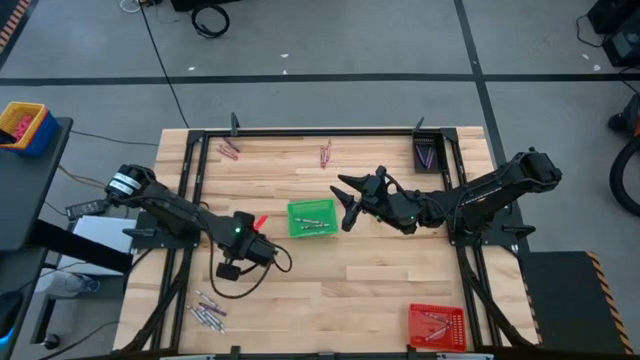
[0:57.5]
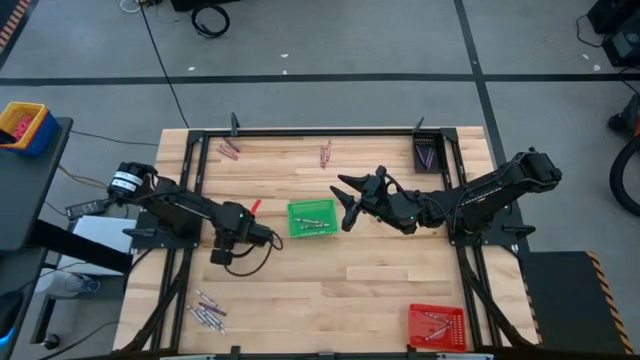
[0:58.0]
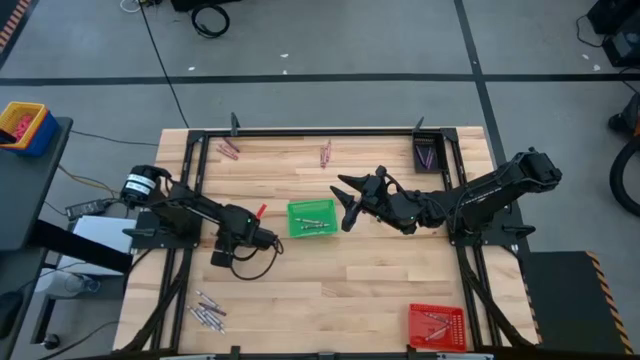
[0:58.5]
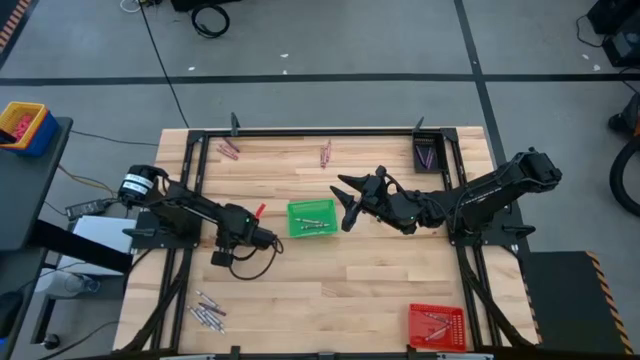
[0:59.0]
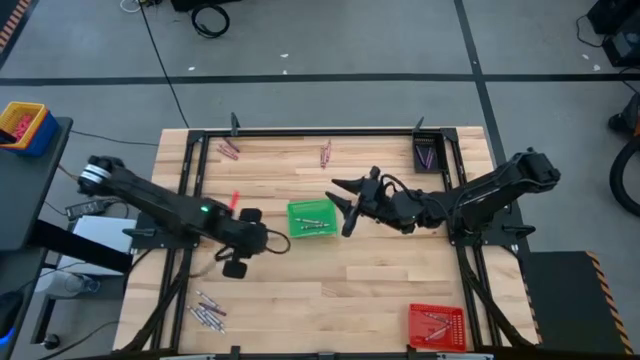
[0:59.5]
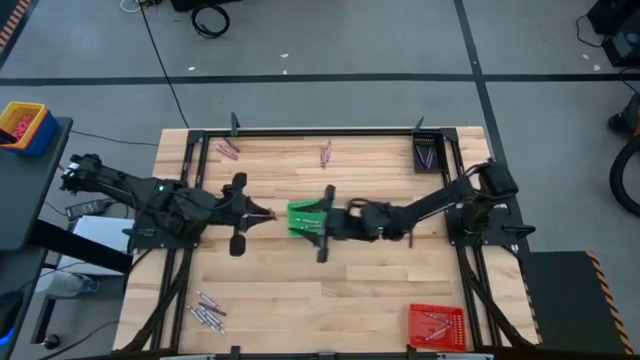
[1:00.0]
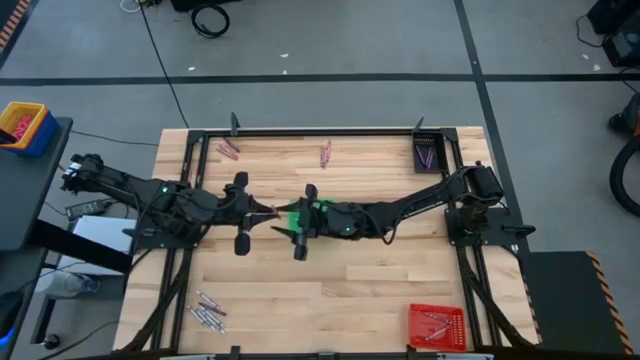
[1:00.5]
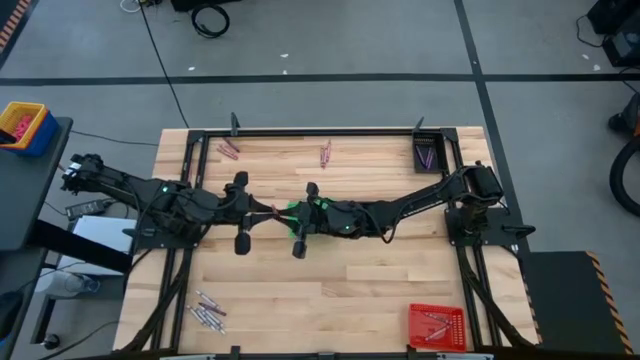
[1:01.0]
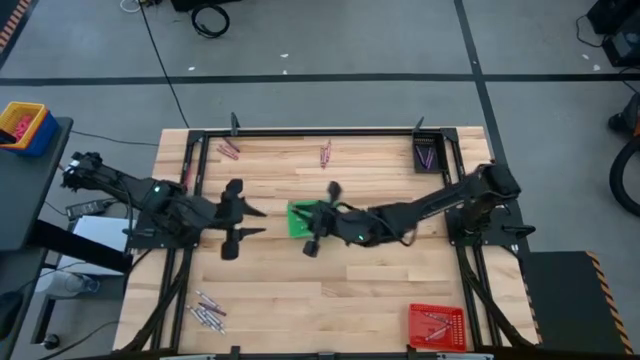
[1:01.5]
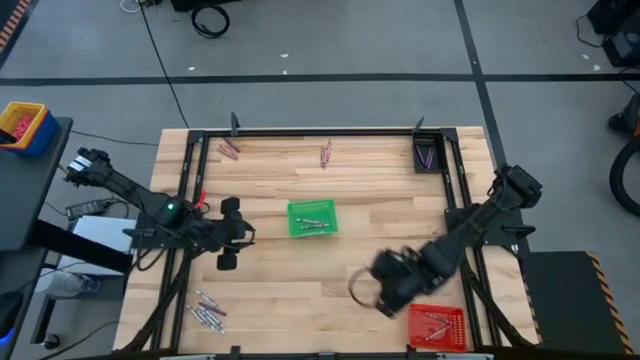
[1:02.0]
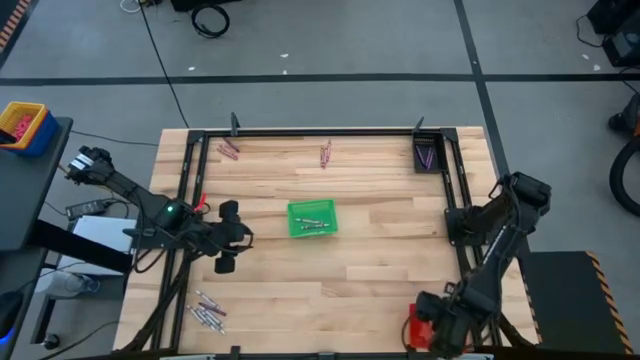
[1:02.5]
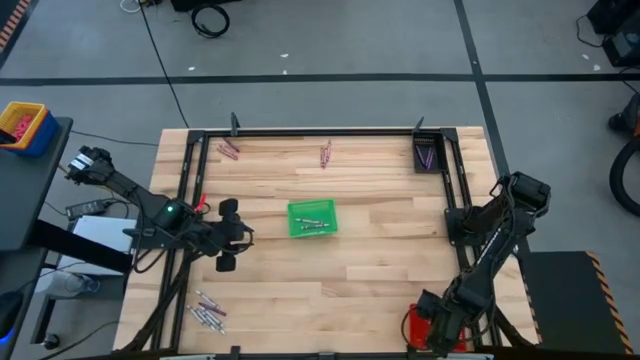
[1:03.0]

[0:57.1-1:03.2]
Task: Sort crayons
Put the pink crayon into the red basket

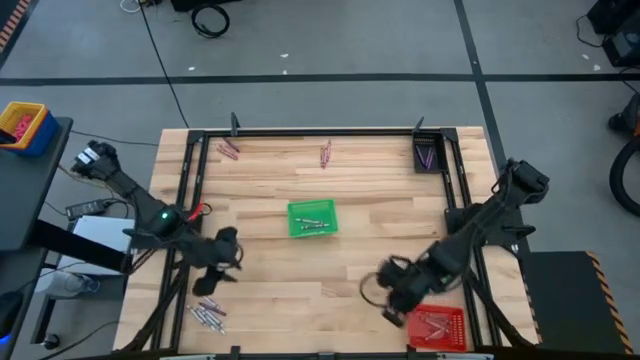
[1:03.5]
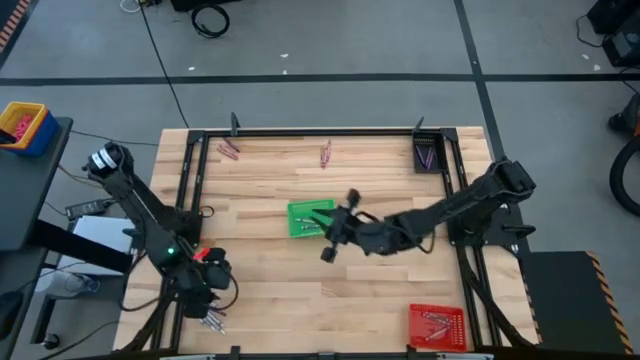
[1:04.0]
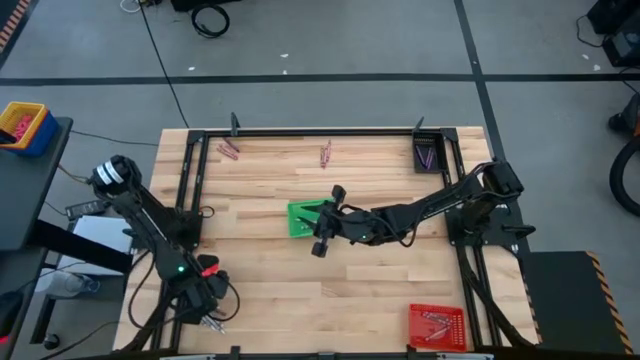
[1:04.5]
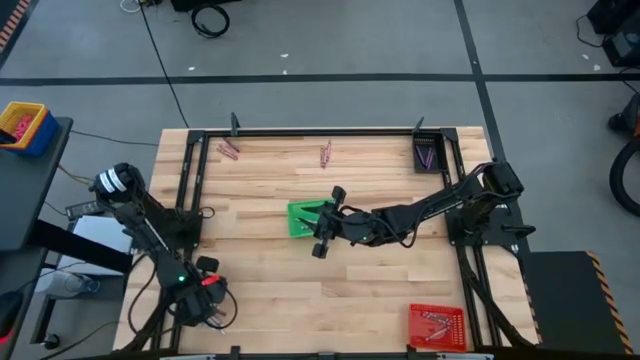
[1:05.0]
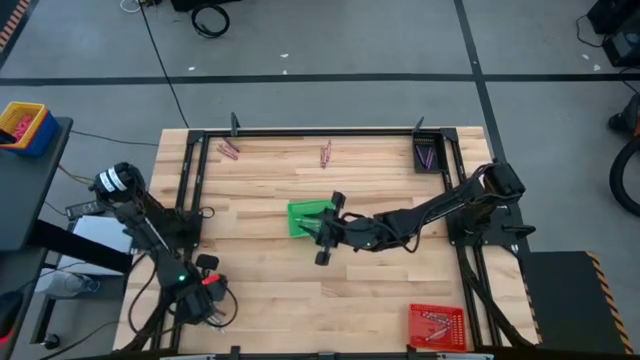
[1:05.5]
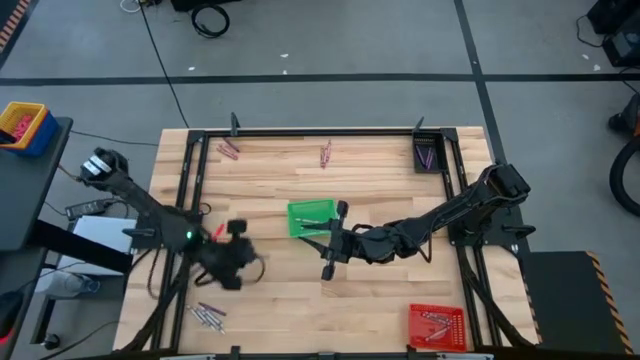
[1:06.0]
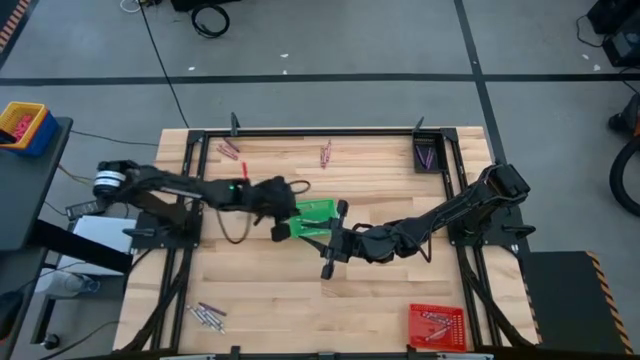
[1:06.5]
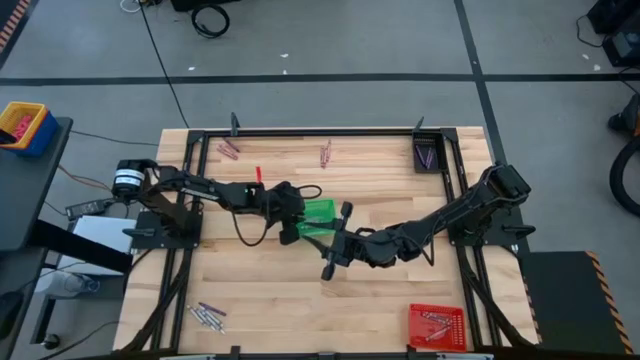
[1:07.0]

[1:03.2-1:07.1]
Put the white crayon into the green basket

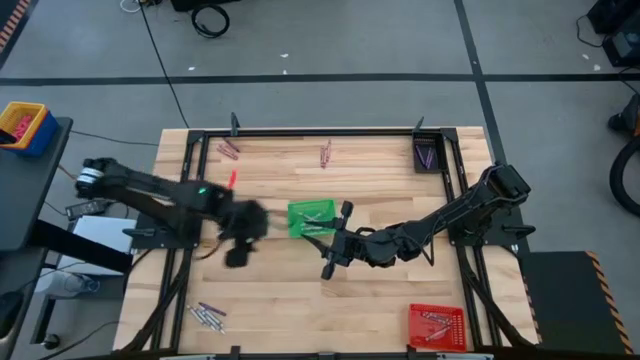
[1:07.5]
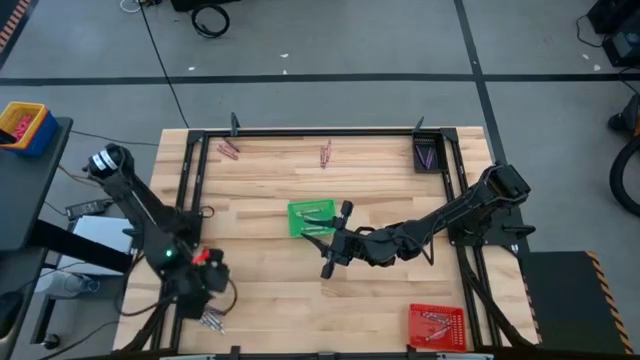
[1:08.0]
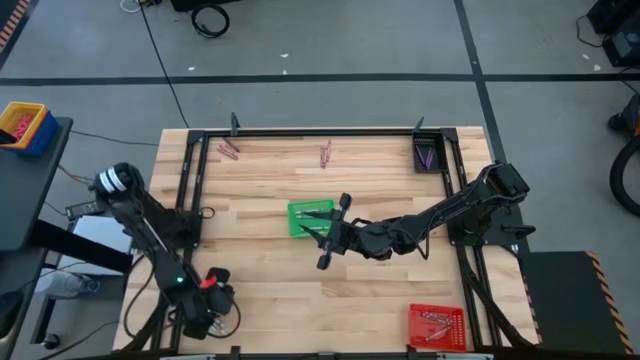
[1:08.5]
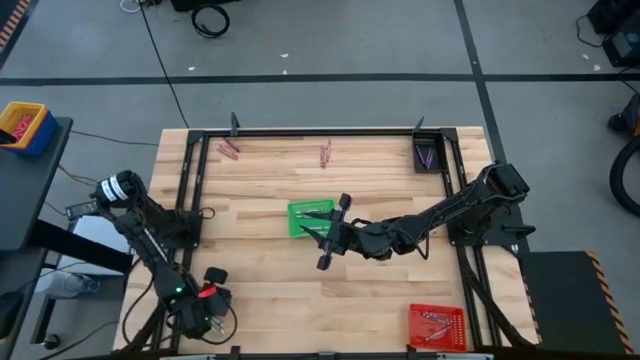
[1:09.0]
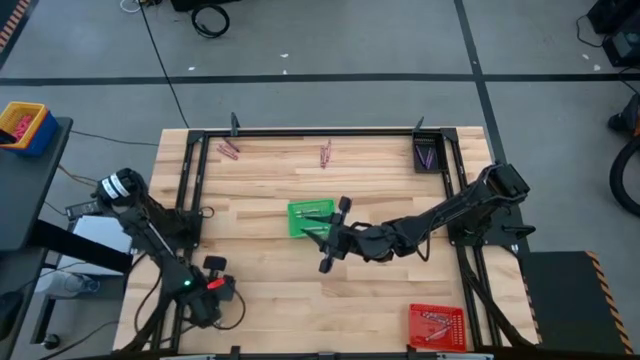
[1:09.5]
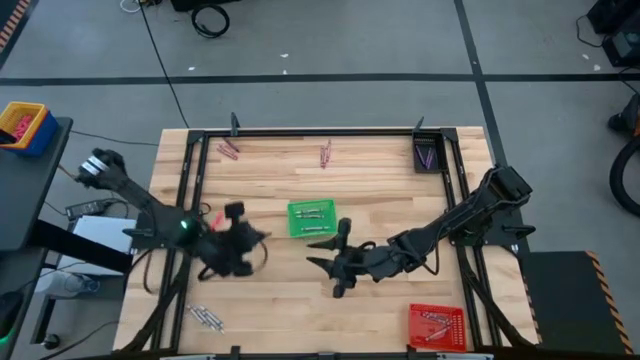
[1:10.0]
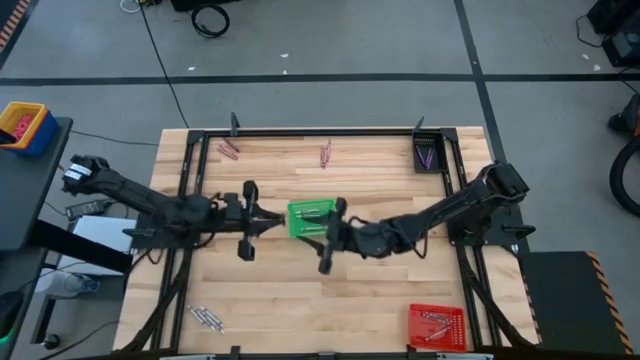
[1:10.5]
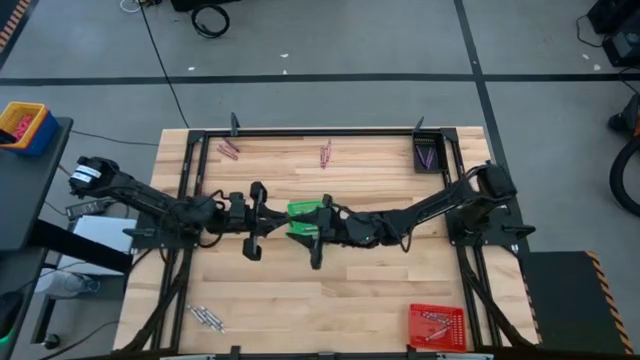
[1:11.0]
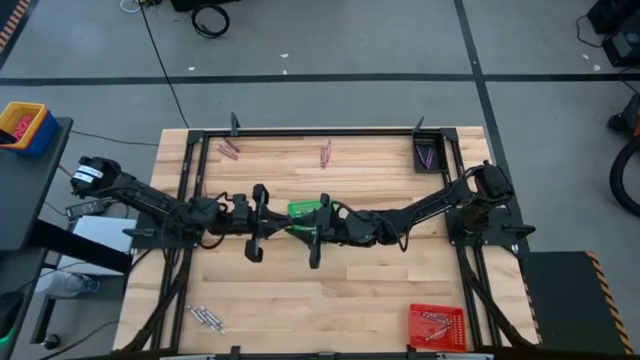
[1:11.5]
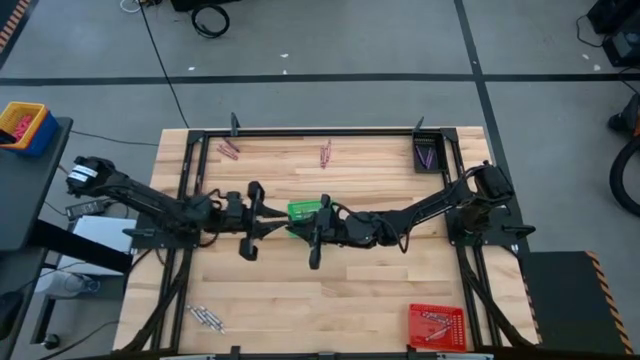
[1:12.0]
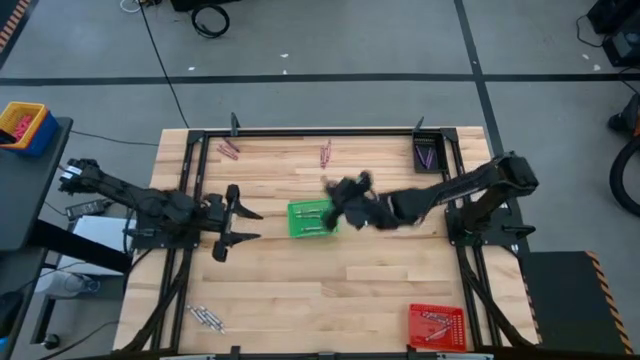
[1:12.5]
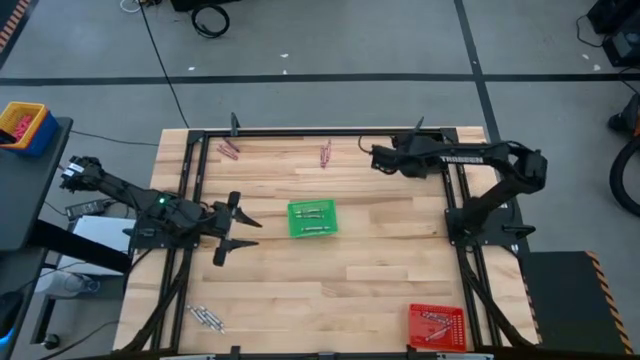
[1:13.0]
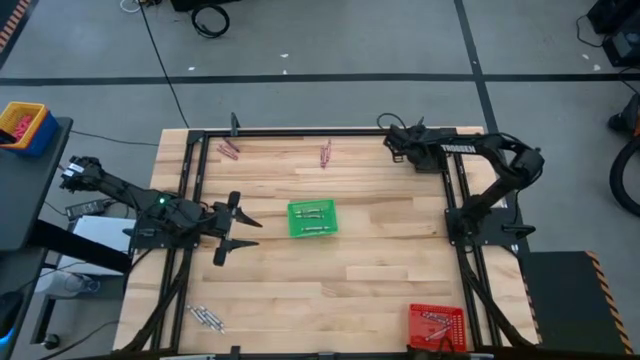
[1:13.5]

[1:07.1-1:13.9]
Put the violet crayon into the black basket

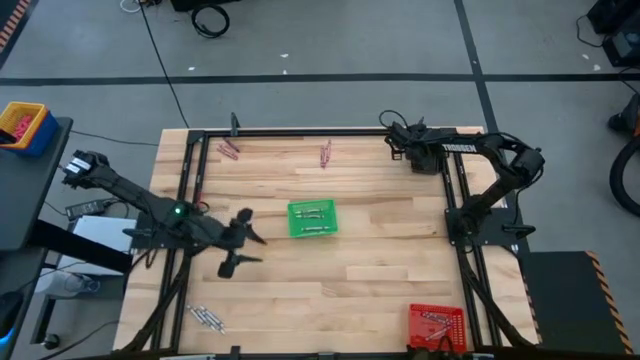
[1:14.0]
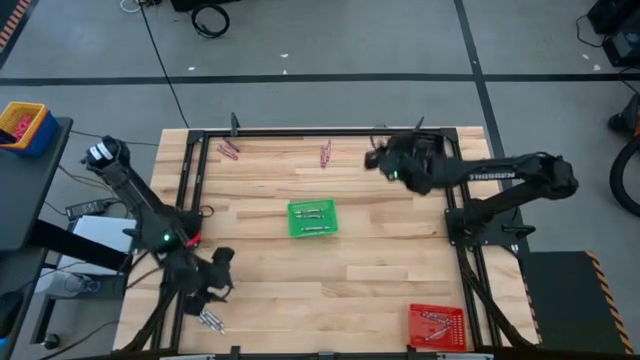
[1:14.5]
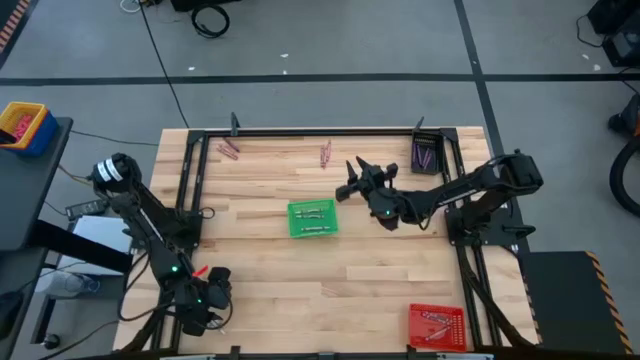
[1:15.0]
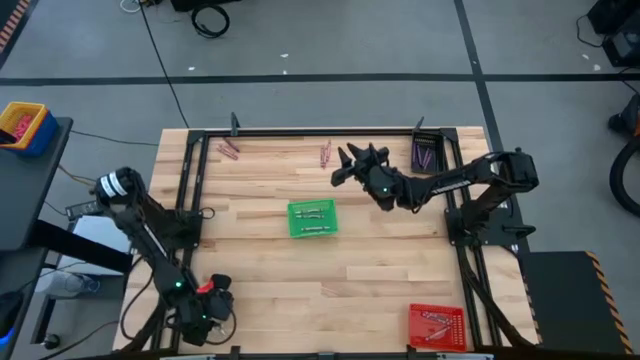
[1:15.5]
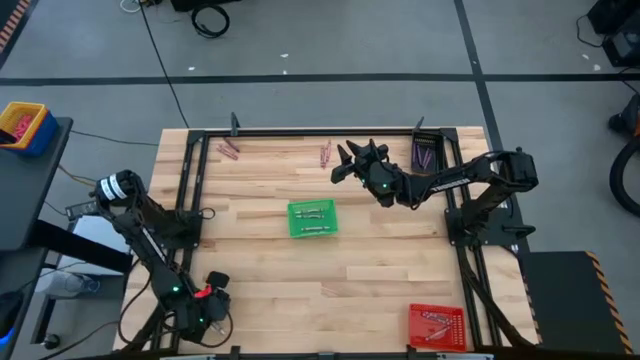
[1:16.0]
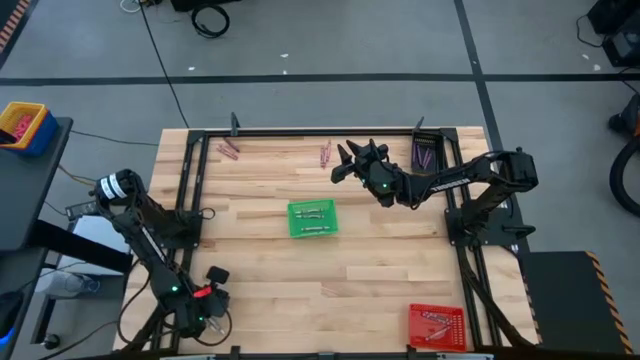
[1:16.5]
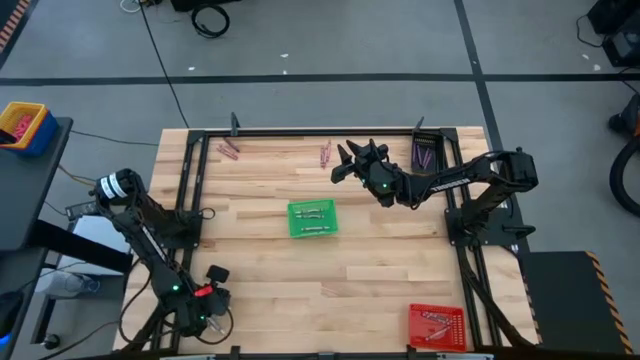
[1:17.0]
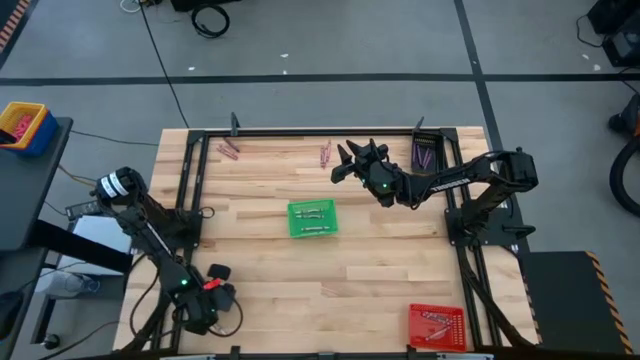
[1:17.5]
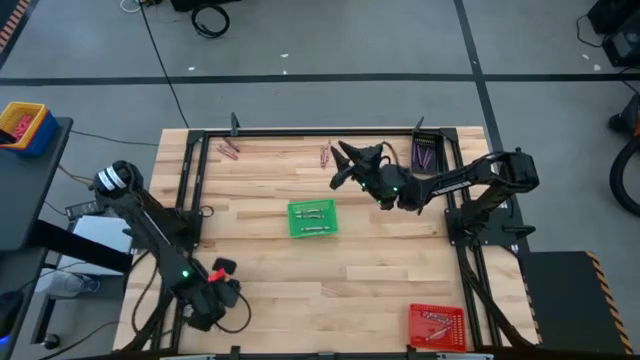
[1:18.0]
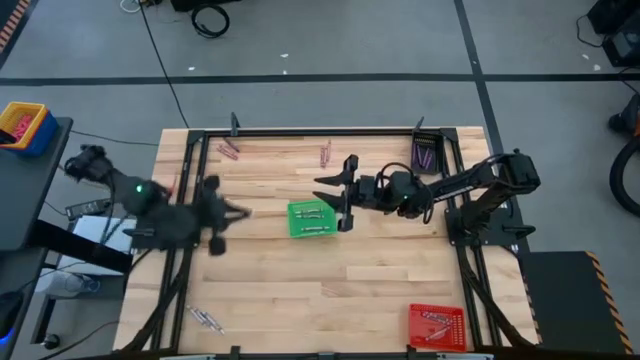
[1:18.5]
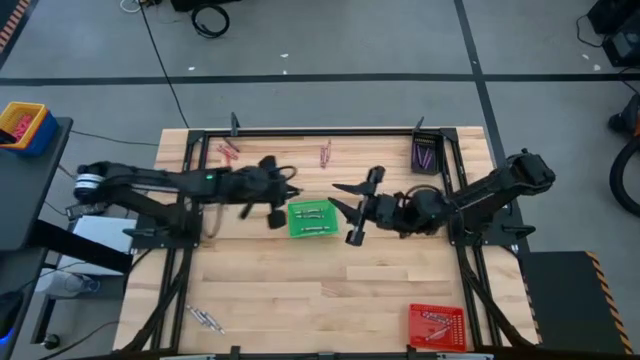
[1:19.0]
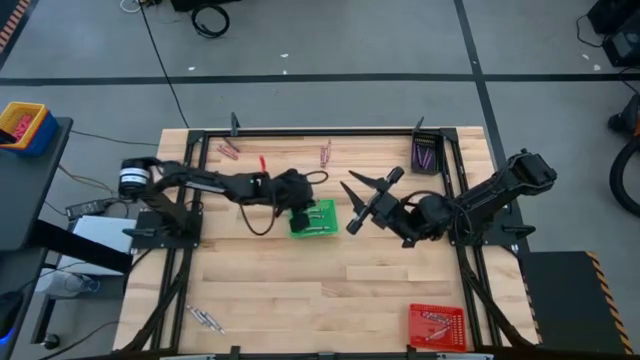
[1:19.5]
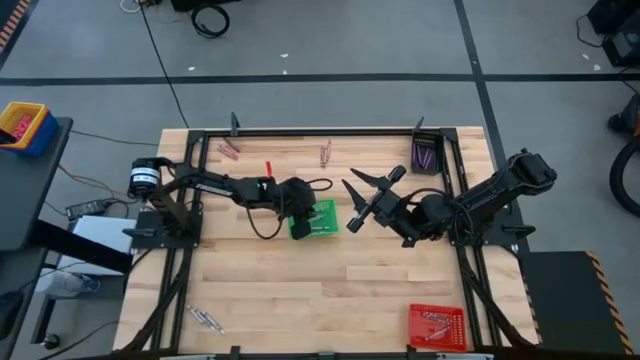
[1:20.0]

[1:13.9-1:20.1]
Put the white crayon into the green basket
